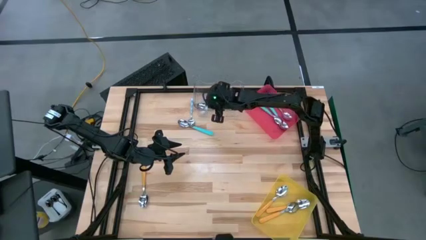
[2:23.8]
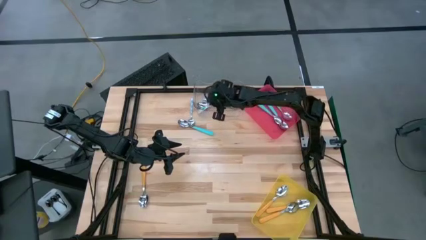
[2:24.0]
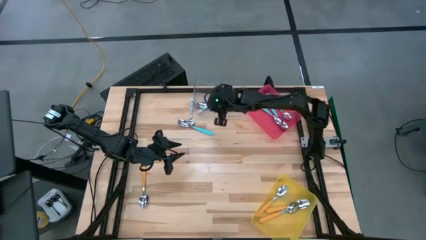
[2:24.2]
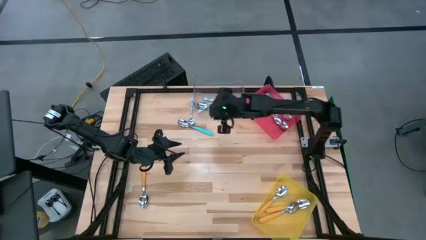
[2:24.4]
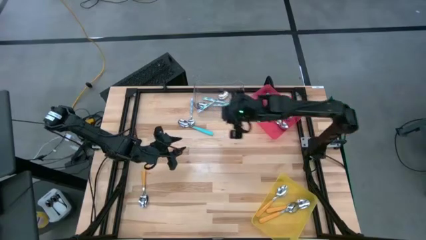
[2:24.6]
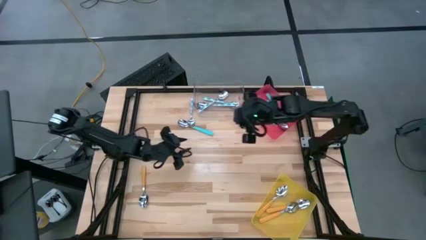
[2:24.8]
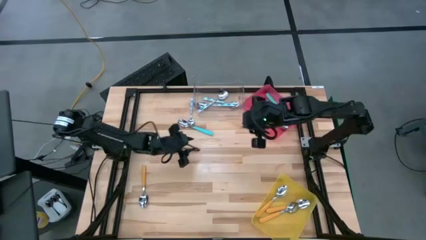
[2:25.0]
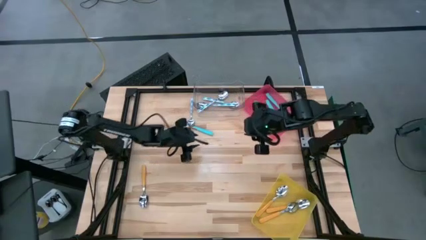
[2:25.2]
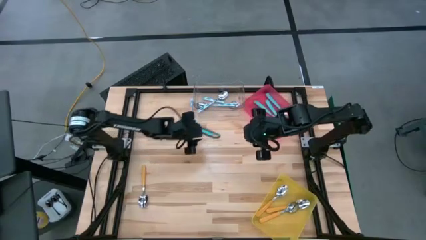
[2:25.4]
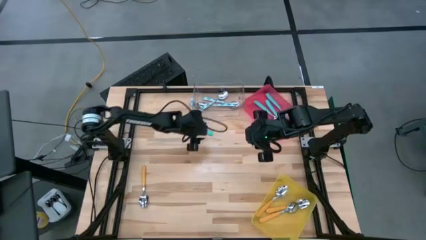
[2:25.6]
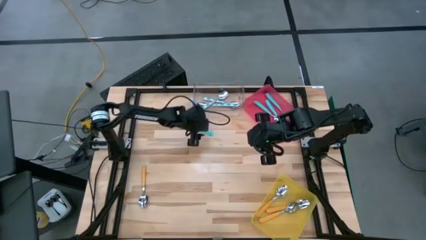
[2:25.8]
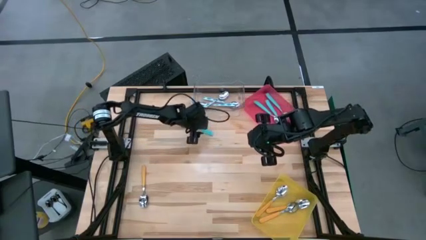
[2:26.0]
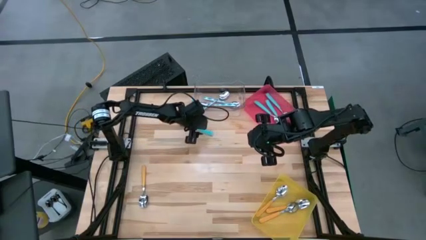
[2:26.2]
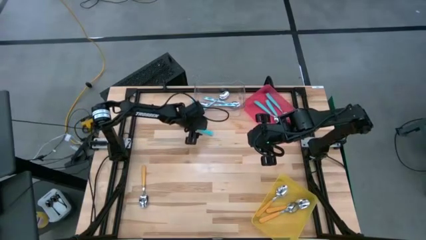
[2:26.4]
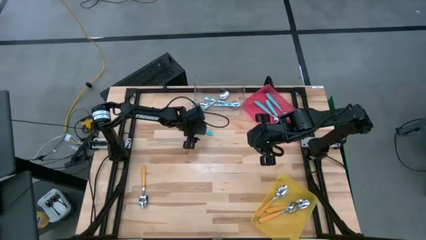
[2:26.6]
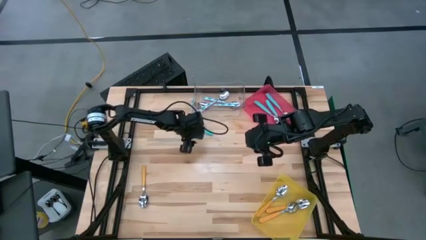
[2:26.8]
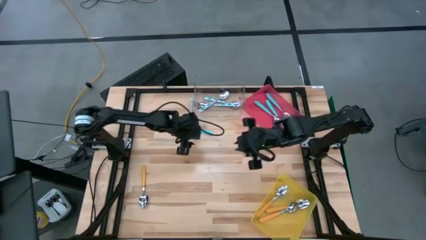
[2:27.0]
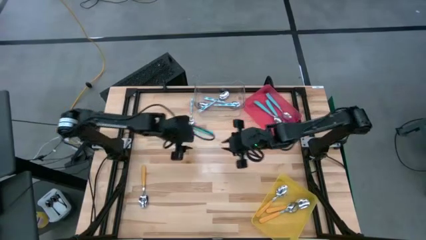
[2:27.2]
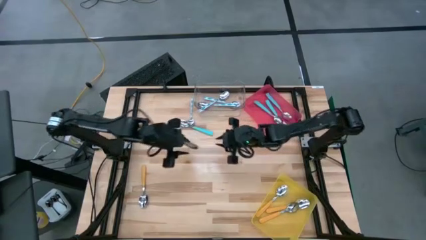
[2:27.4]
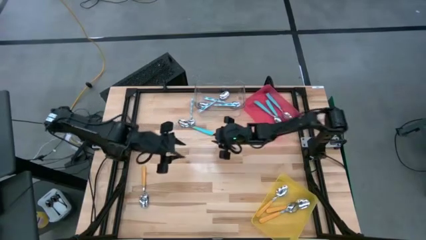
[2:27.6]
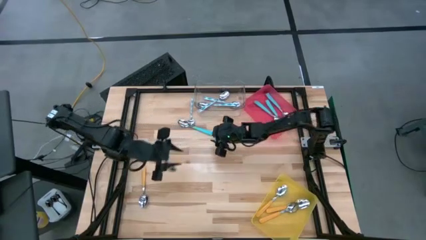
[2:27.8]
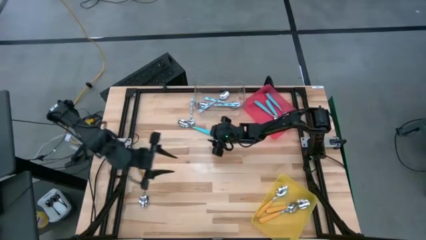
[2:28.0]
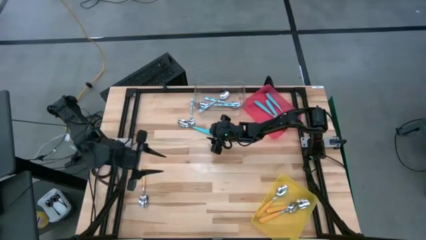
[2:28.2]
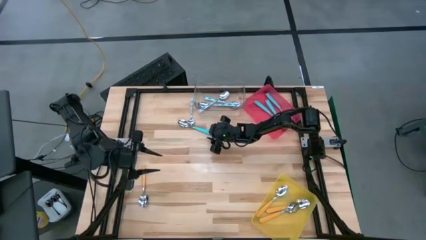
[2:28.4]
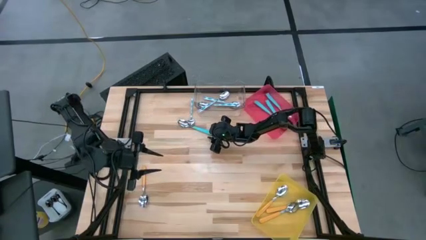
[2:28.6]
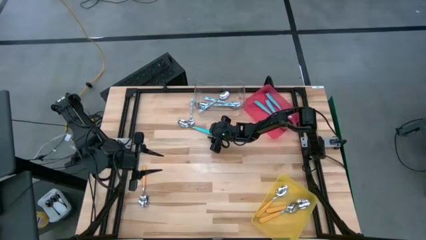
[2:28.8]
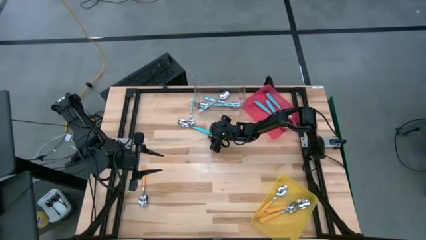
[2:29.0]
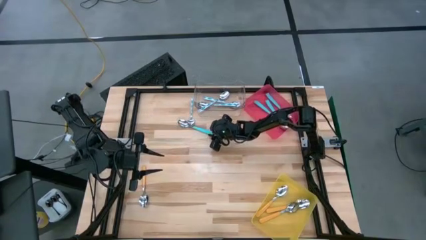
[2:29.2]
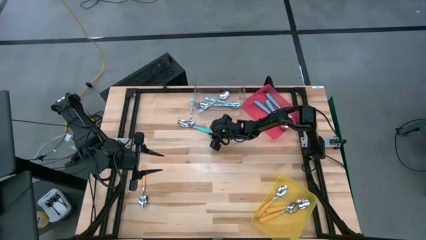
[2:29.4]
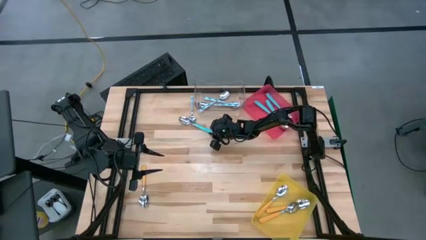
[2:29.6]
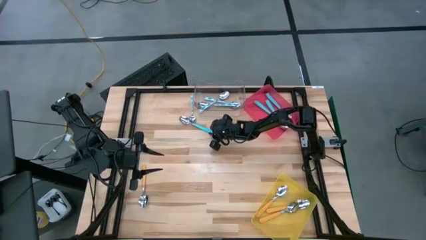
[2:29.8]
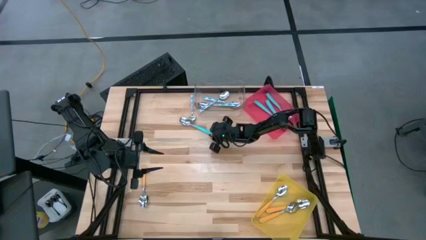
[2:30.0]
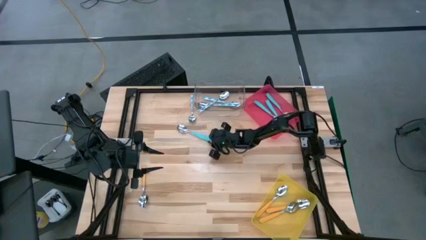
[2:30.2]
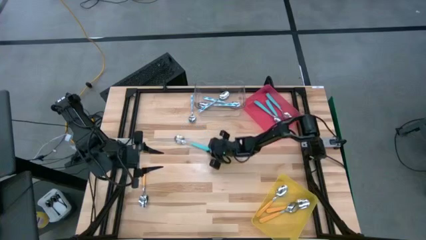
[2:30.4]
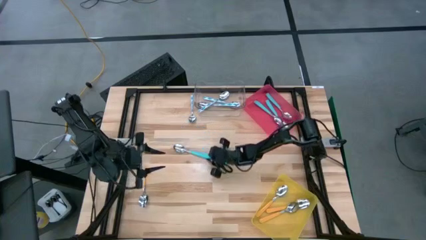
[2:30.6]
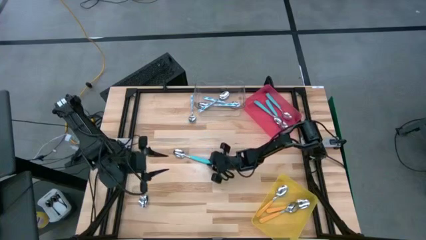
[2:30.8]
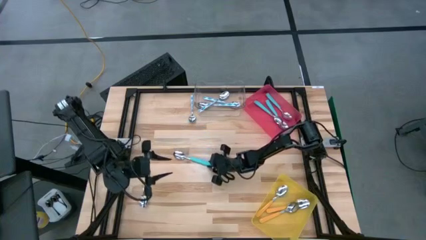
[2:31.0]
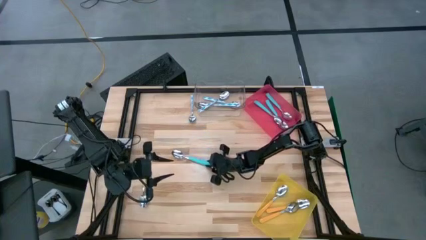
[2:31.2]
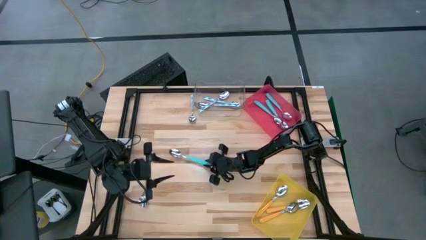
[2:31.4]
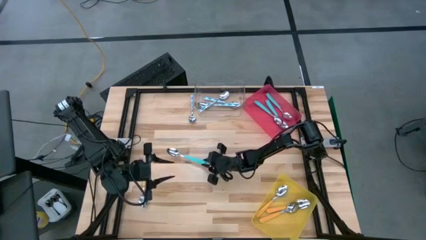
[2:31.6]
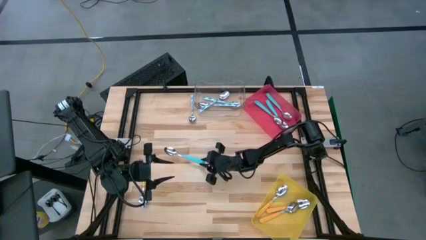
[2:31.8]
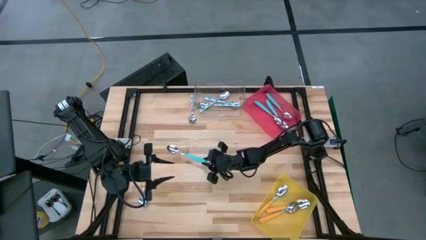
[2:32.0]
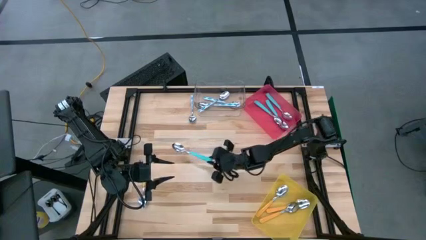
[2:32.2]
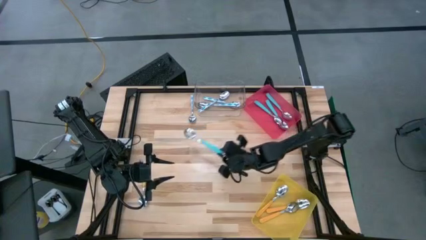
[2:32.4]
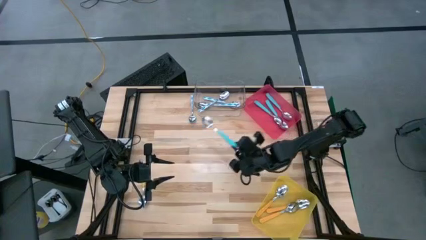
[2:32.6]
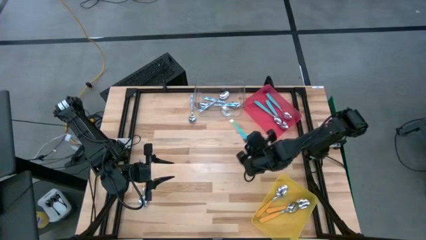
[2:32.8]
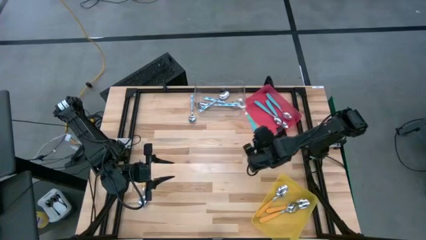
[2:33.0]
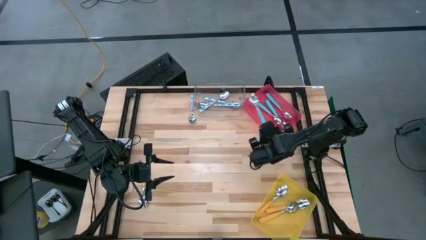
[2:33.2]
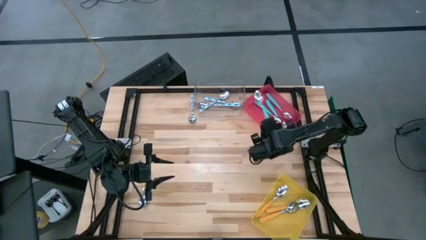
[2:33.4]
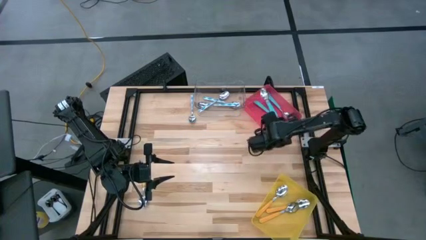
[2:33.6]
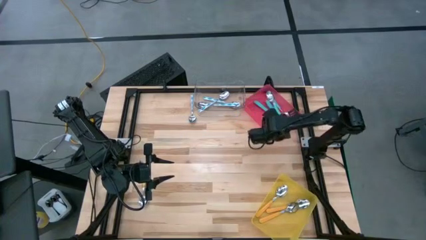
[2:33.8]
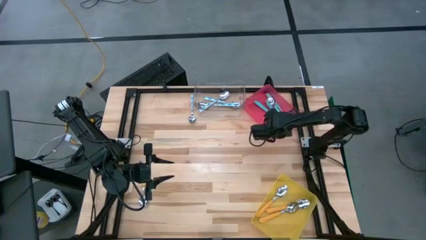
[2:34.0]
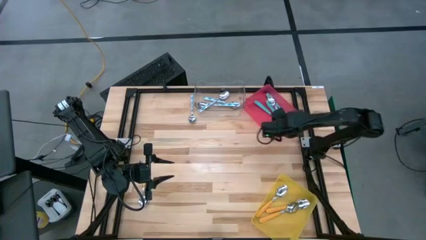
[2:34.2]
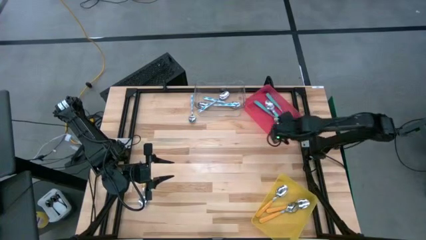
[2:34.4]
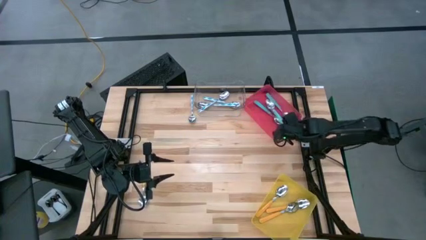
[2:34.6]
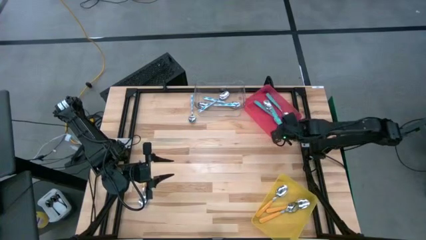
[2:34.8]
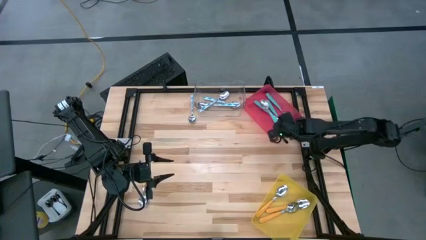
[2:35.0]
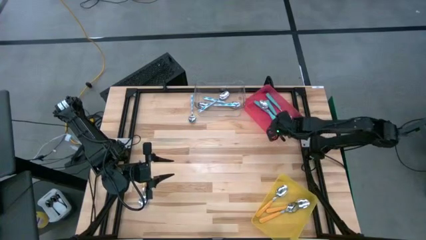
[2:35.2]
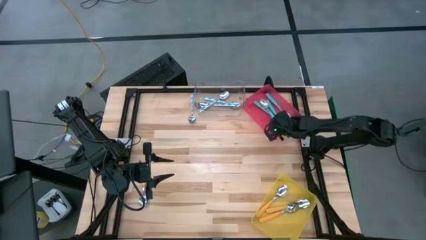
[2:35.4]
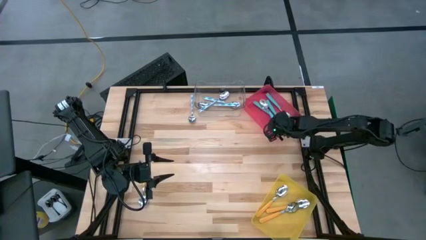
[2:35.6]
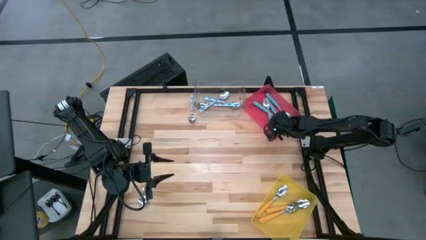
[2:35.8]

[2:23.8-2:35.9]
Task: Sort silverware by color (type)
Put the blue spoon into the red bin

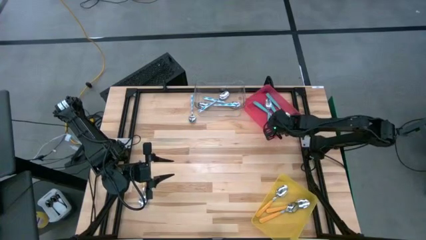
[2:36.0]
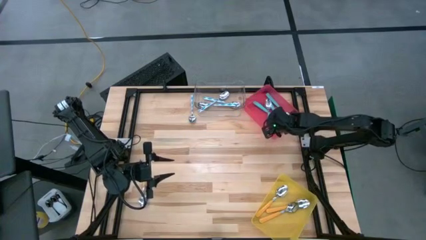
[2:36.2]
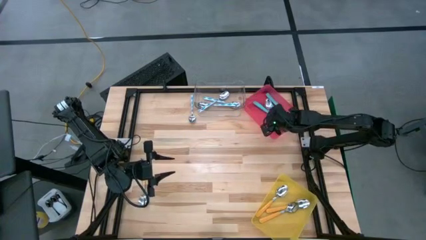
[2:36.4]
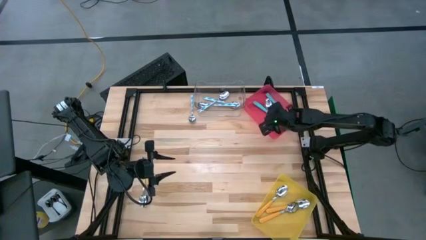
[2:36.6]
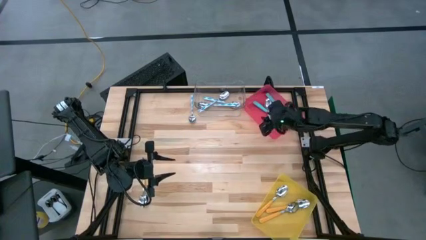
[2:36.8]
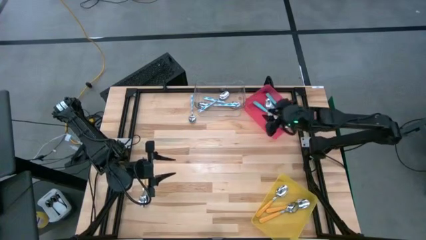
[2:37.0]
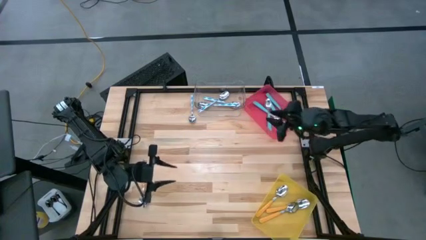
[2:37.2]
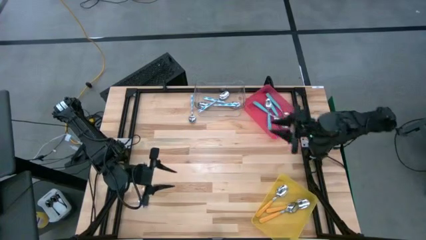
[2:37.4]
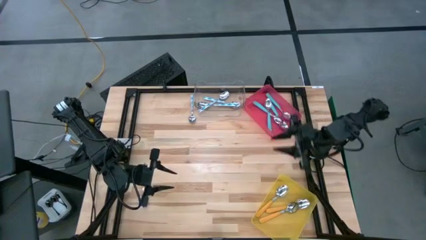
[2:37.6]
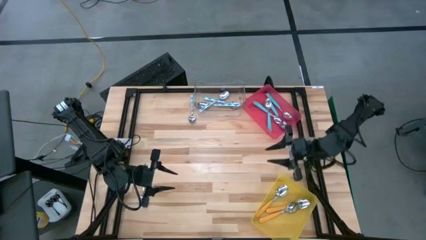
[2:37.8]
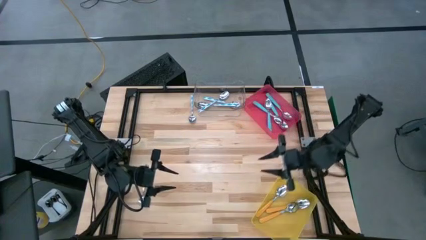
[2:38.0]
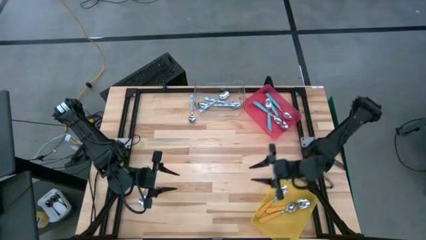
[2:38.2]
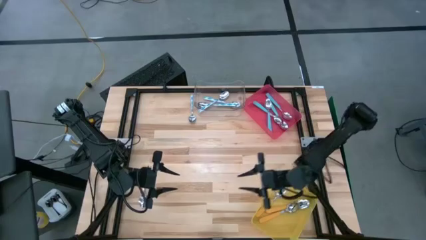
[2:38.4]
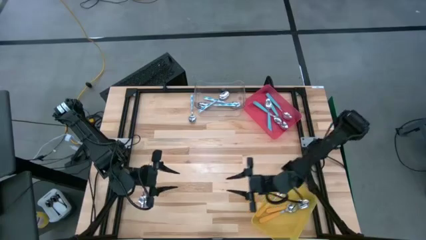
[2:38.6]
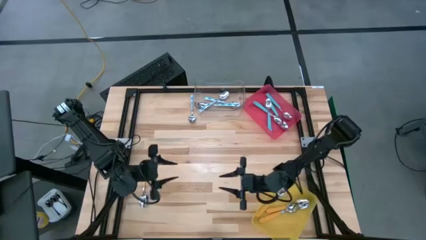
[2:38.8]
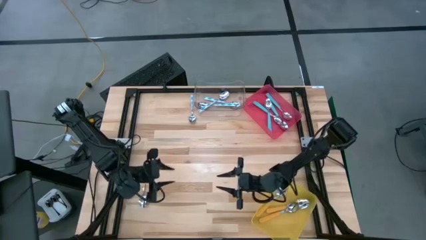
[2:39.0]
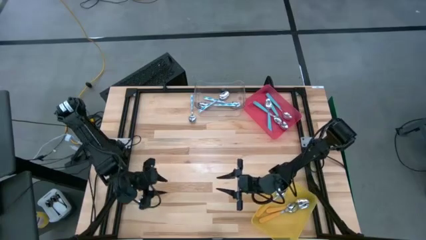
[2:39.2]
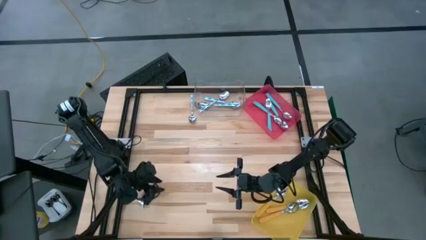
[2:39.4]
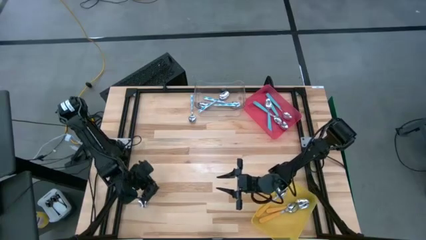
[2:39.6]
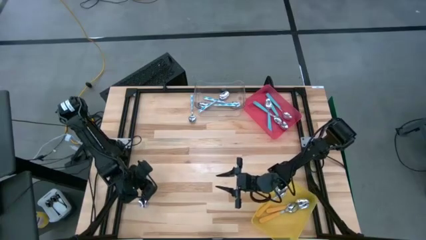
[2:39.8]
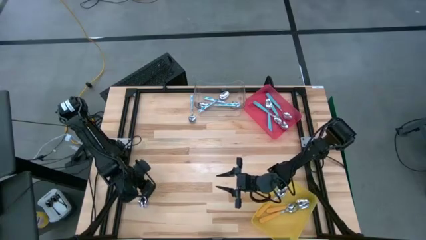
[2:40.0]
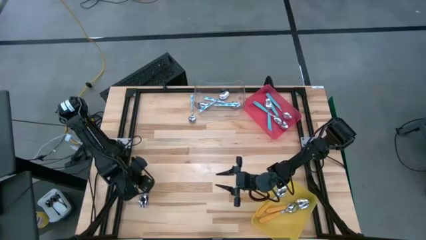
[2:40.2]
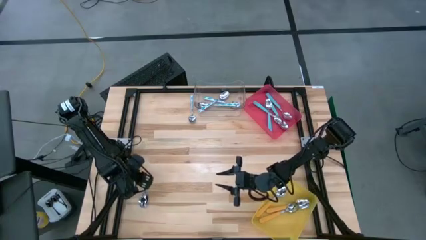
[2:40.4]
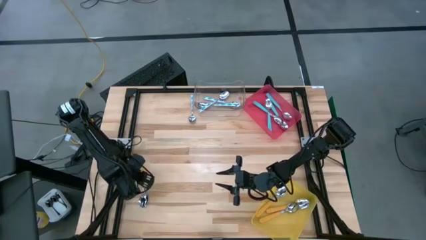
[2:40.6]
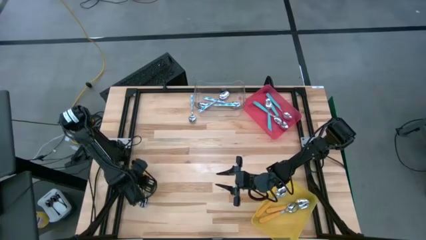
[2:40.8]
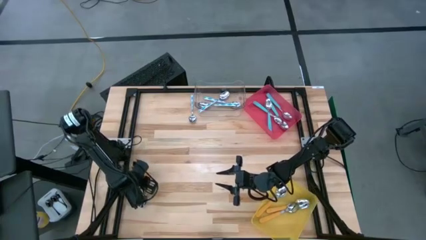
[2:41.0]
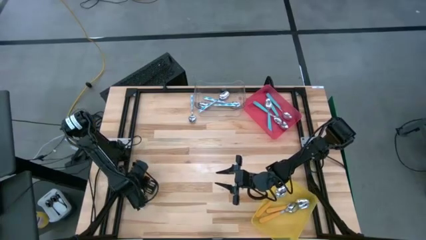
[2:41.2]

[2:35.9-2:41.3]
Put the orange spoon into the yellow bin
